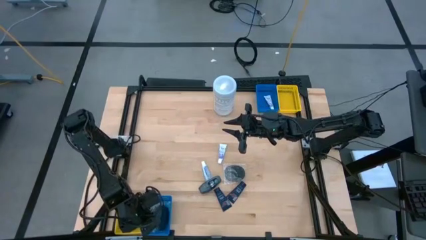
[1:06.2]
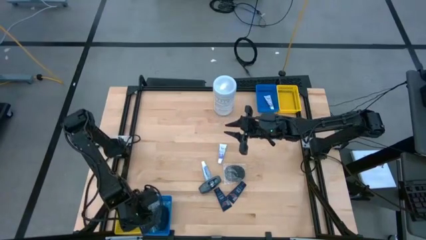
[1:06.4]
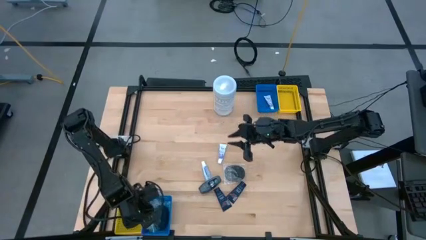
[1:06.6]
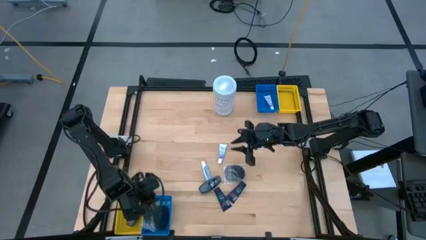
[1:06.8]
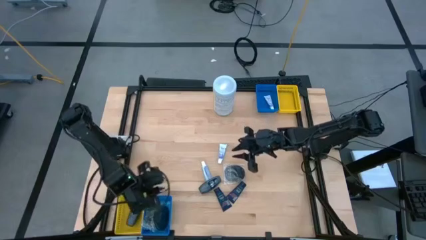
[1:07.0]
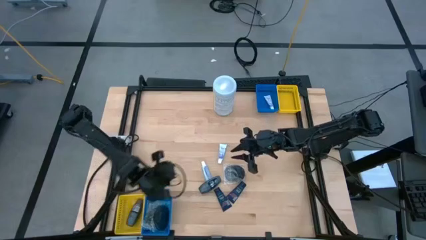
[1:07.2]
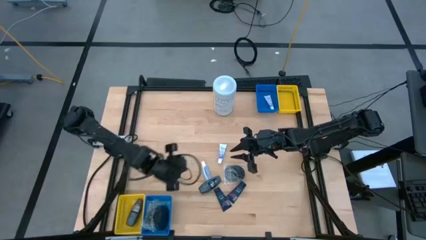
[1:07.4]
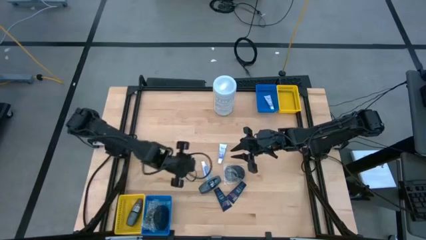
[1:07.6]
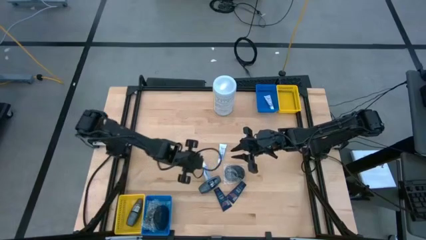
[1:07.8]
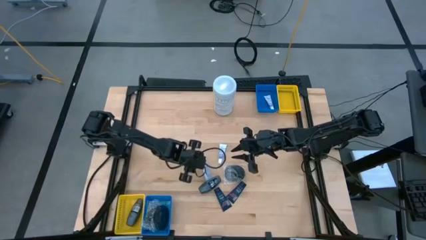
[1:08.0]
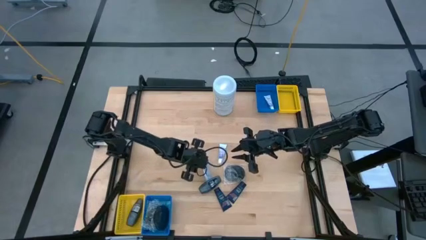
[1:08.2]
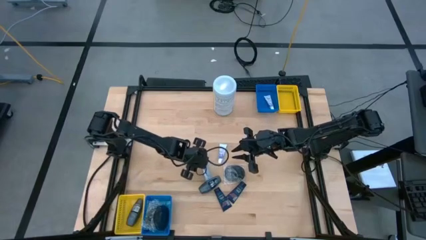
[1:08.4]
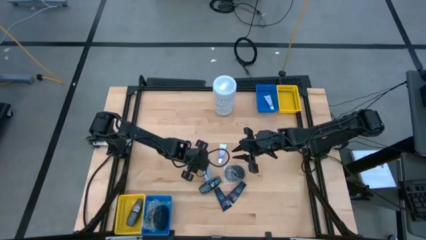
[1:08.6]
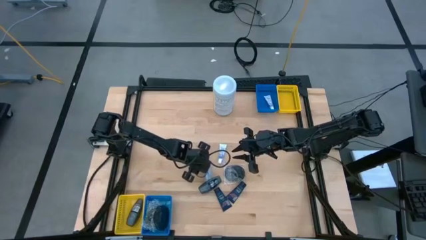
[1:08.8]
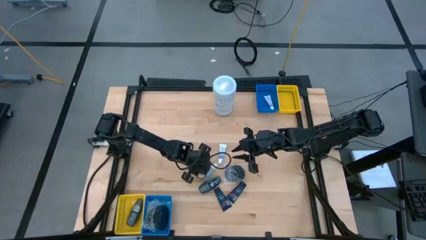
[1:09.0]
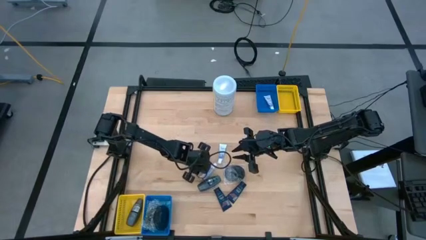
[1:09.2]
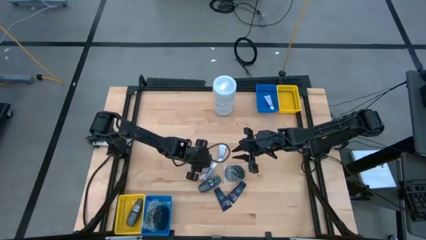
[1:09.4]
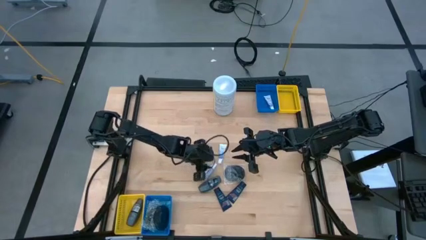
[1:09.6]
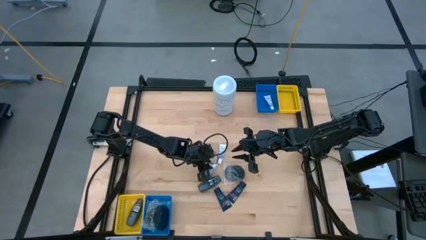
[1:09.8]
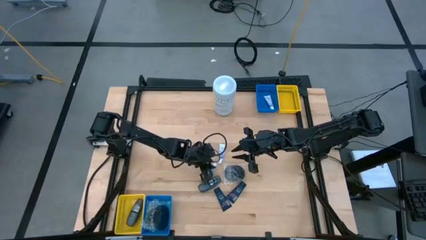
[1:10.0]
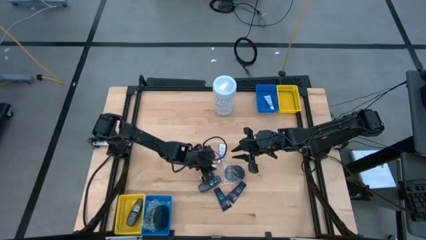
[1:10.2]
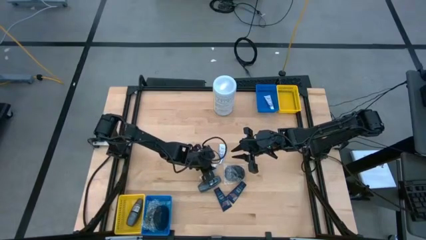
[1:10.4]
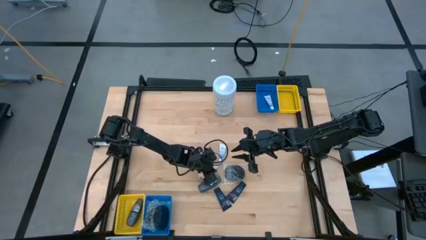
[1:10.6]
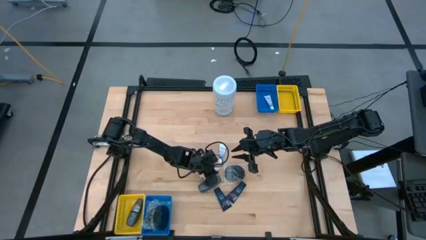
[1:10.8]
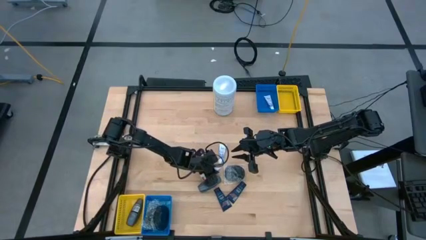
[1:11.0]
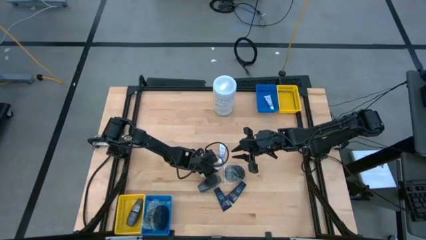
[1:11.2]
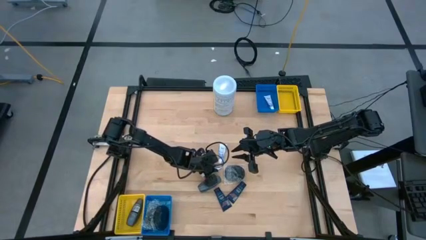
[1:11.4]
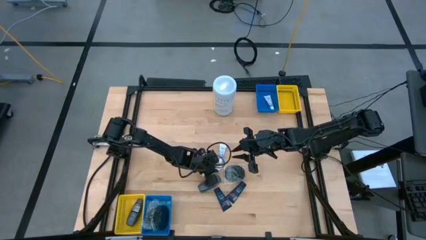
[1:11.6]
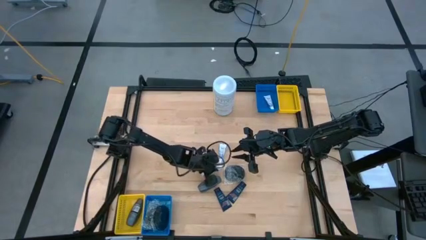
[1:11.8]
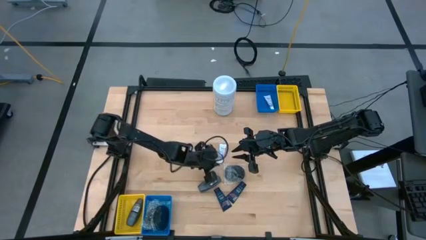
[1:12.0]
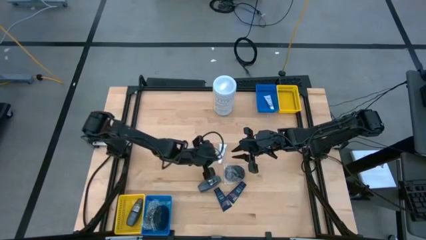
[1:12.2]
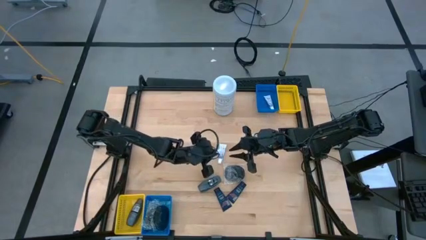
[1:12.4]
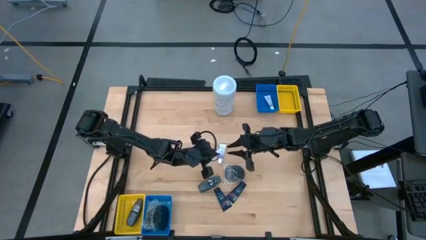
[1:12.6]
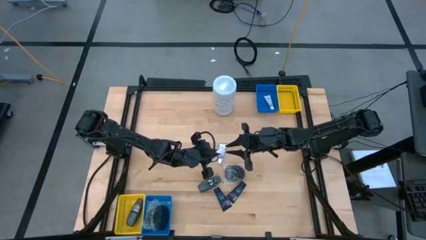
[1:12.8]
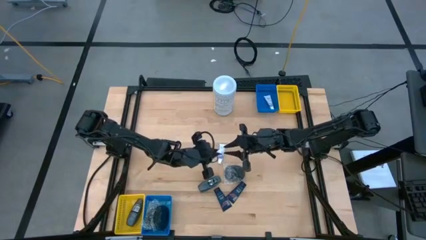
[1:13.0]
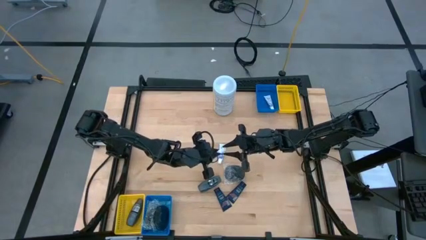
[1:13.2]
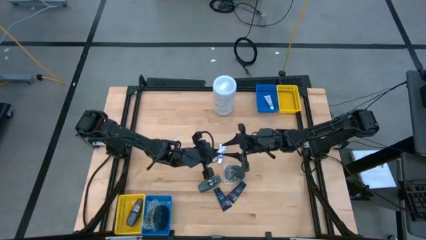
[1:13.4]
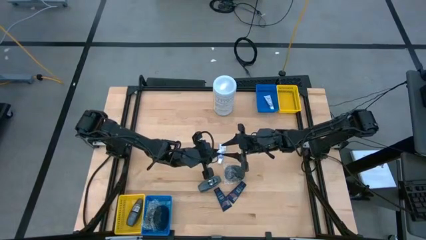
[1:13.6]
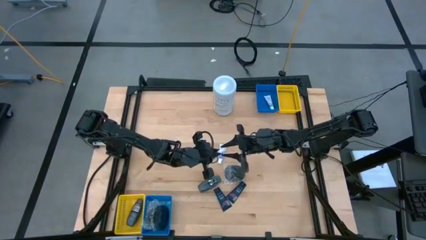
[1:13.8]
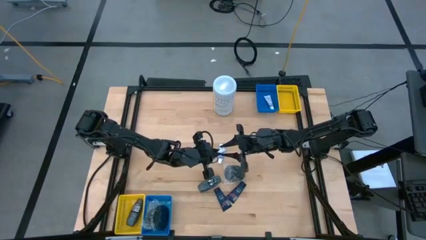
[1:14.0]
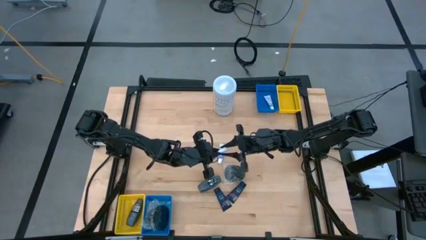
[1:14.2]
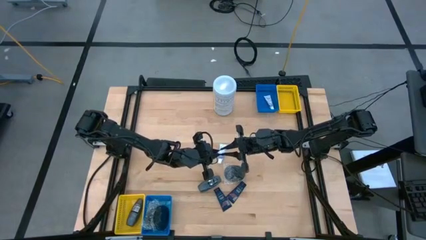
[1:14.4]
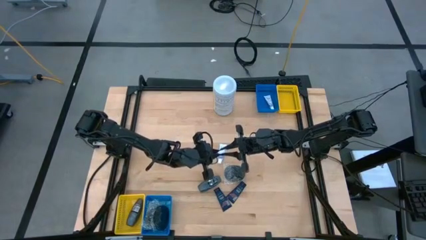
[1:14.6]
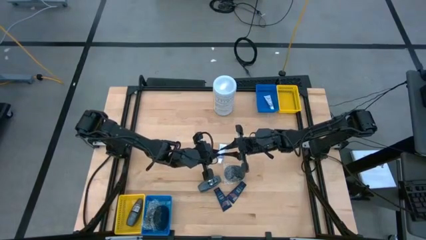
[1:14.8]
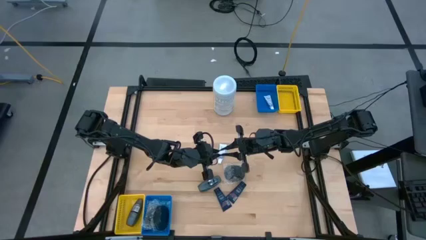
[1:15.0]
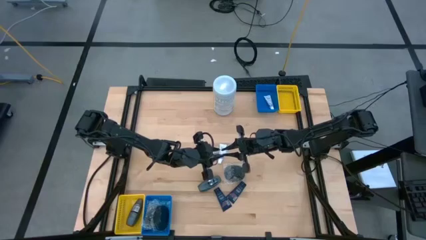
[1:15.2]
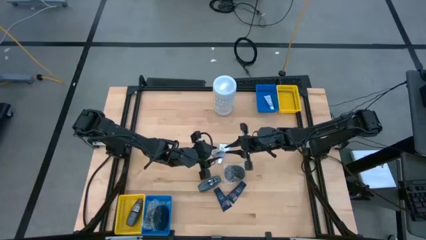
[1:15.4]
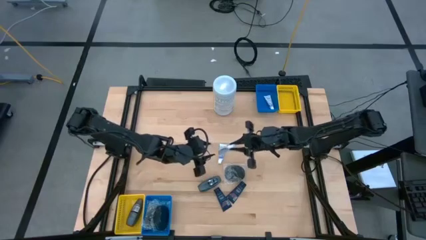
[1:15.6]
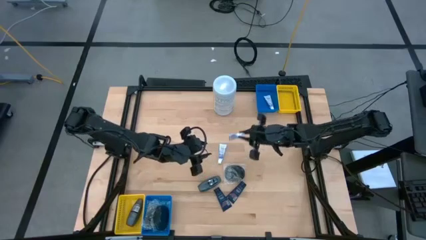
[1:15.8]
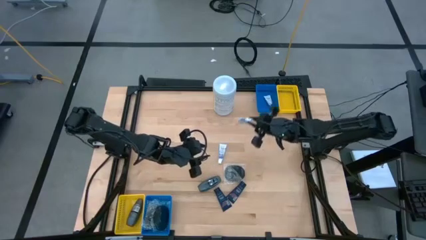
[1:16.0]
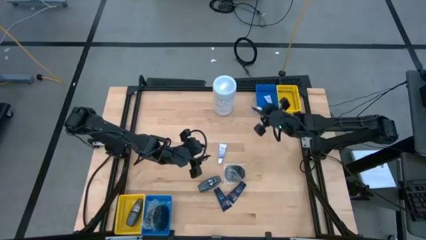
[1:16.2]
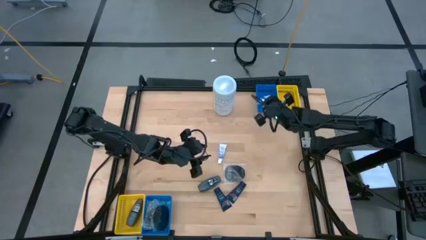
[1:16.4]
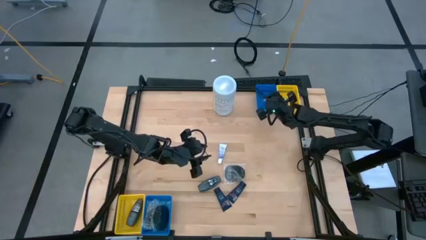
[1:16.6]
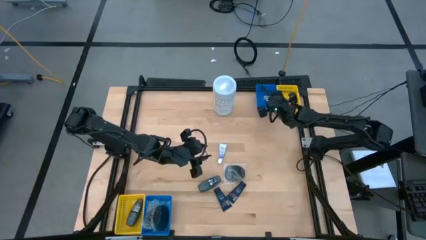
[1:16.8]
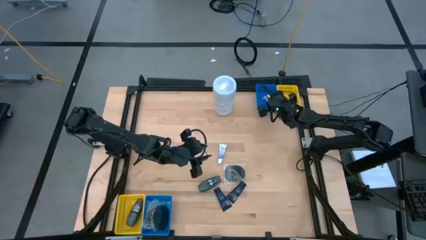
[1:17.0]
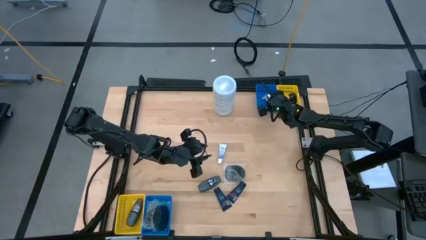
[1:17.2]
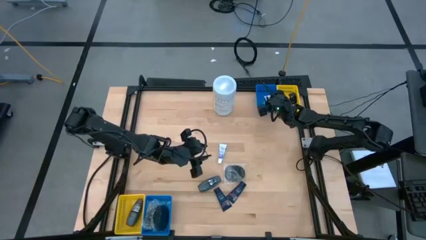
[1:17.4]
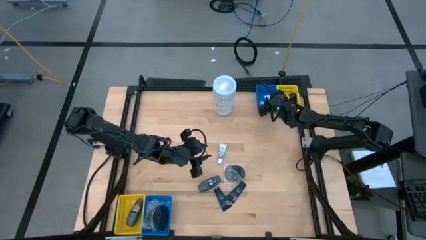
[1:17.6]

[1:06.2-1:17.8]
Task: Pick & Place Travel size toiletries
Put the white toothpaste into the top blue bin
